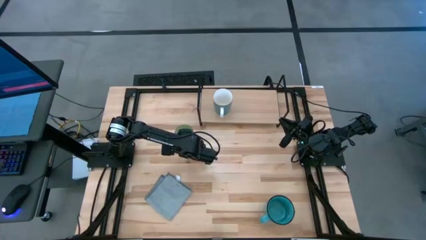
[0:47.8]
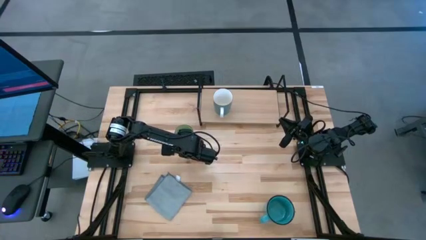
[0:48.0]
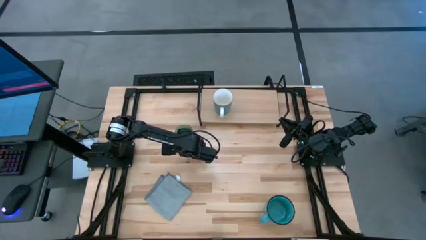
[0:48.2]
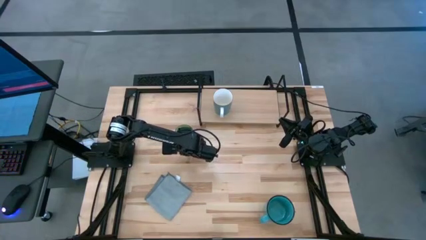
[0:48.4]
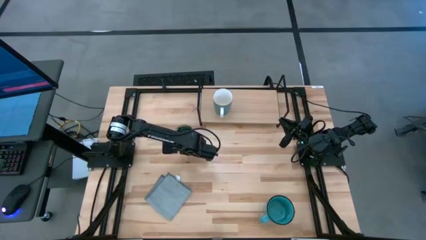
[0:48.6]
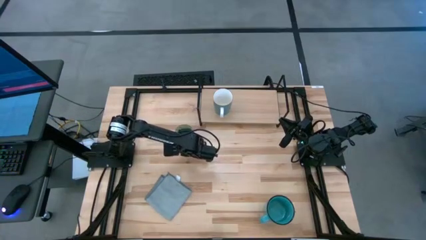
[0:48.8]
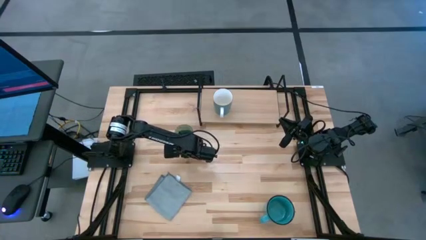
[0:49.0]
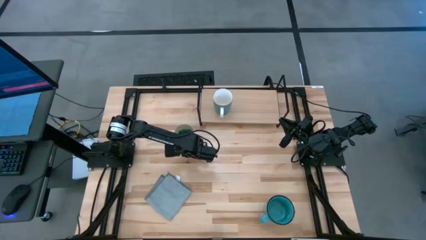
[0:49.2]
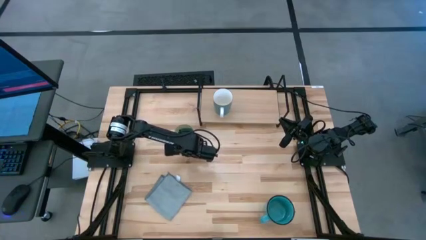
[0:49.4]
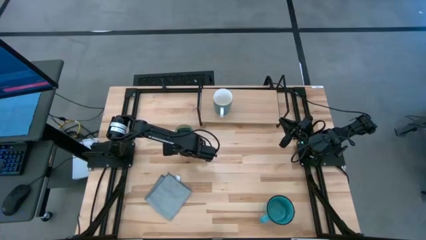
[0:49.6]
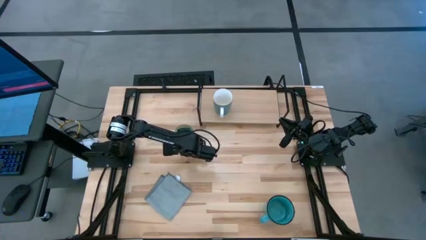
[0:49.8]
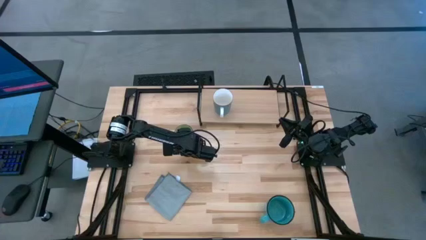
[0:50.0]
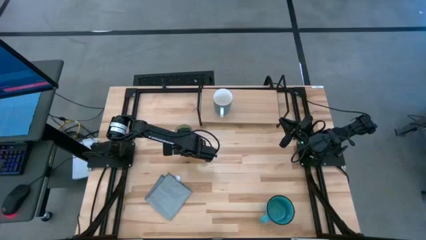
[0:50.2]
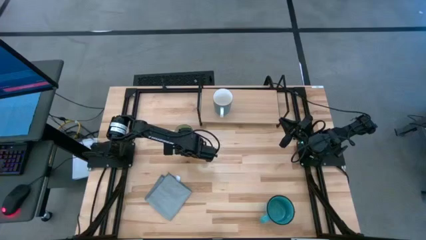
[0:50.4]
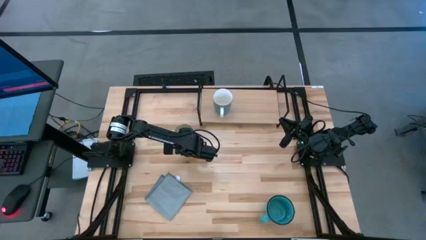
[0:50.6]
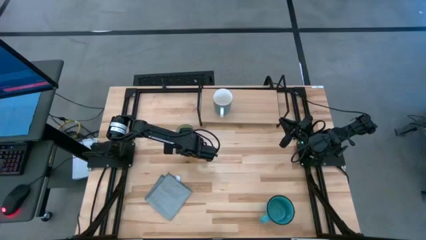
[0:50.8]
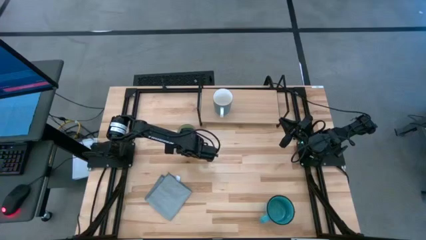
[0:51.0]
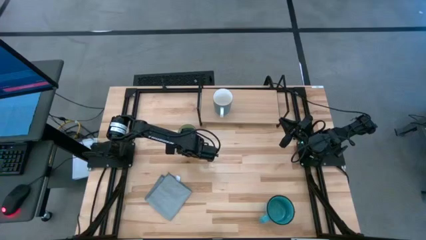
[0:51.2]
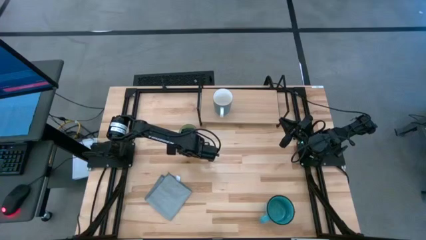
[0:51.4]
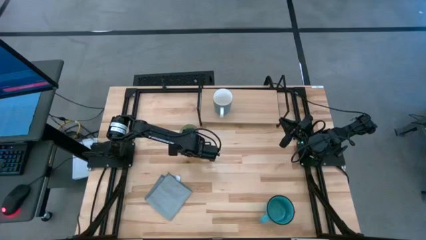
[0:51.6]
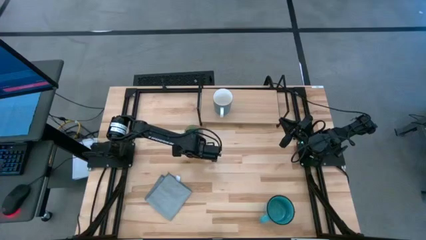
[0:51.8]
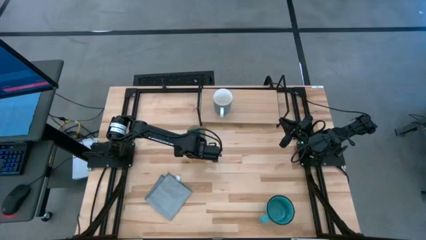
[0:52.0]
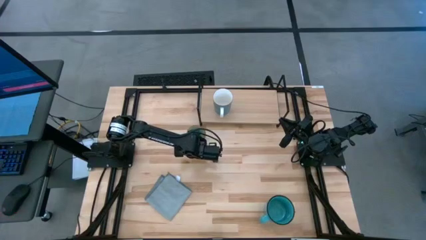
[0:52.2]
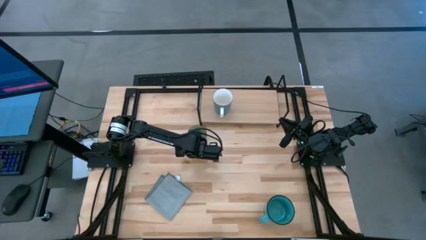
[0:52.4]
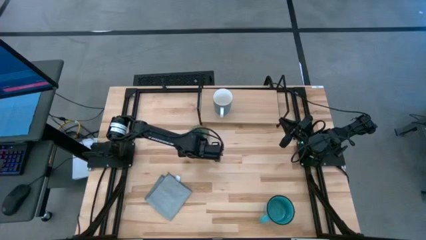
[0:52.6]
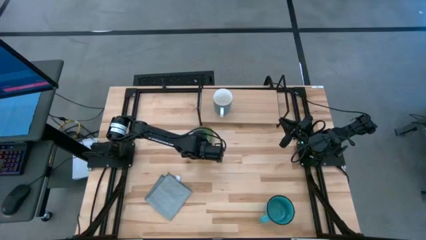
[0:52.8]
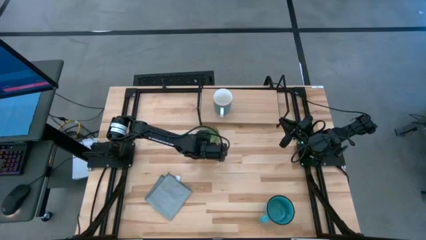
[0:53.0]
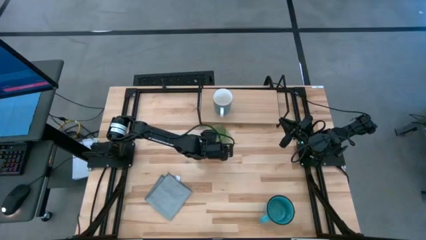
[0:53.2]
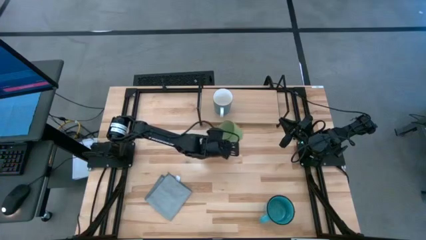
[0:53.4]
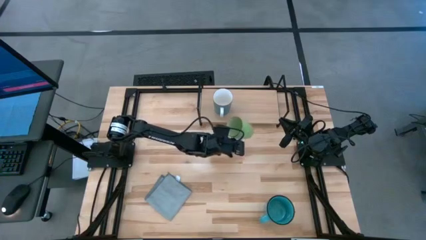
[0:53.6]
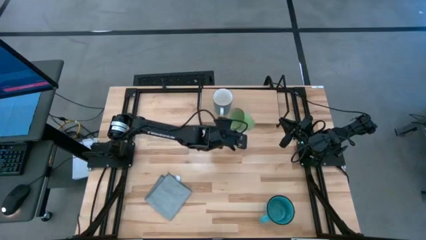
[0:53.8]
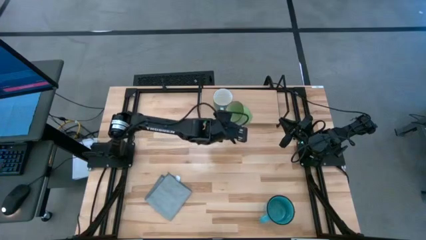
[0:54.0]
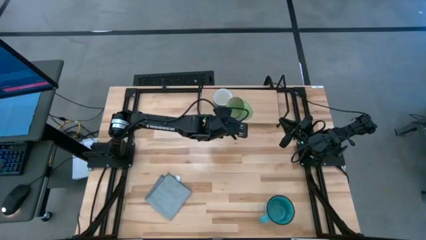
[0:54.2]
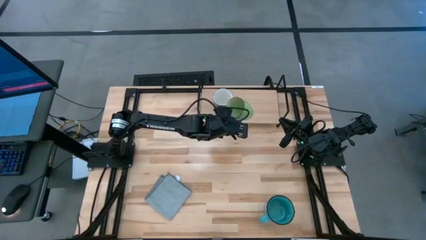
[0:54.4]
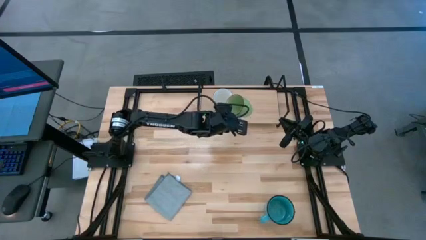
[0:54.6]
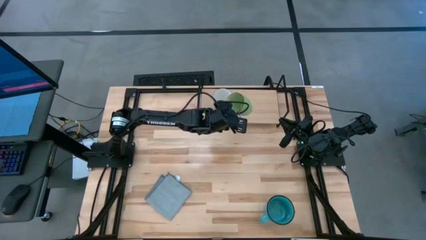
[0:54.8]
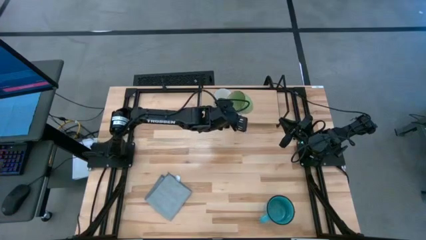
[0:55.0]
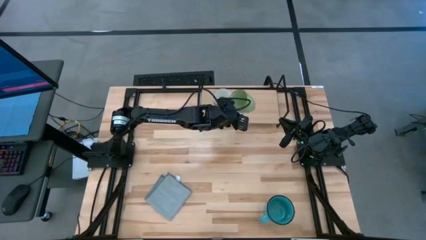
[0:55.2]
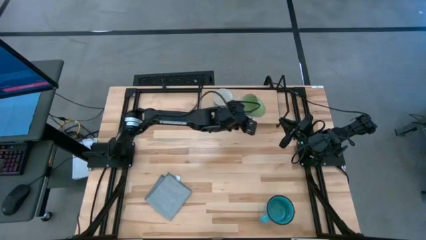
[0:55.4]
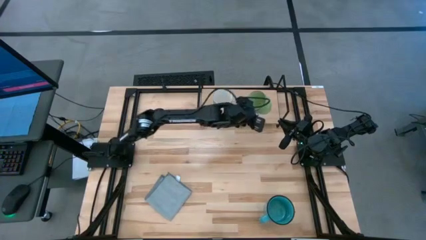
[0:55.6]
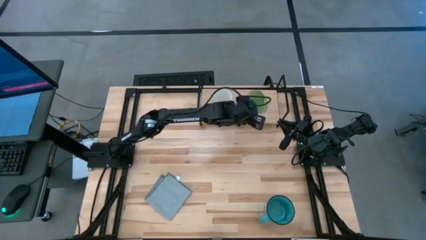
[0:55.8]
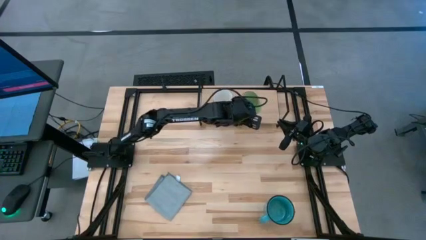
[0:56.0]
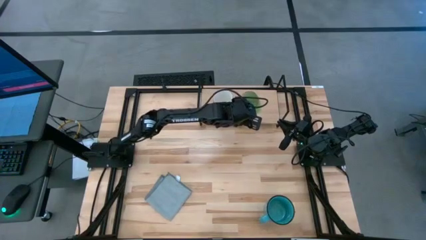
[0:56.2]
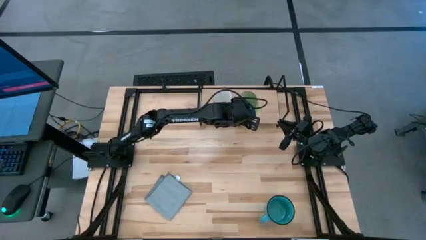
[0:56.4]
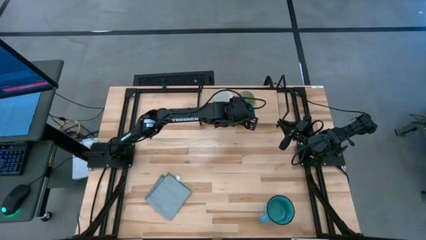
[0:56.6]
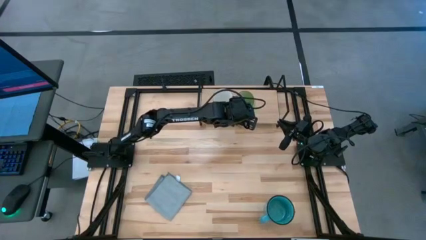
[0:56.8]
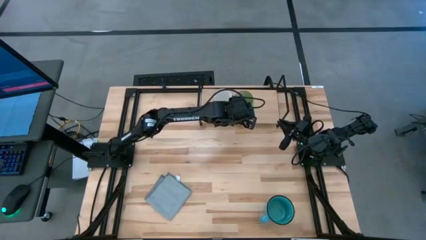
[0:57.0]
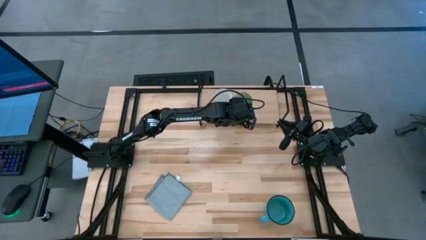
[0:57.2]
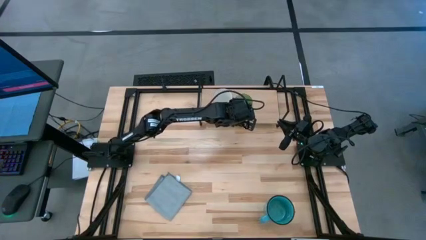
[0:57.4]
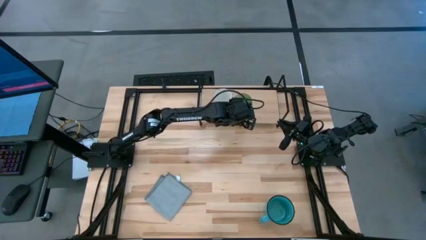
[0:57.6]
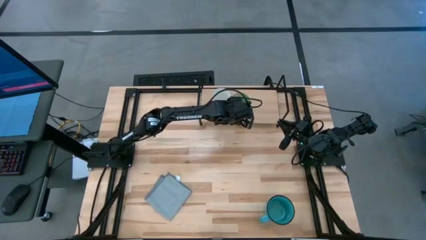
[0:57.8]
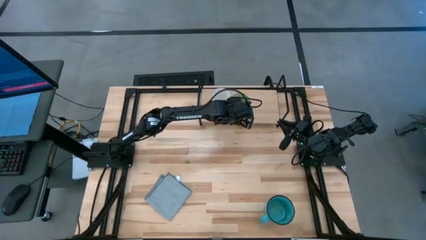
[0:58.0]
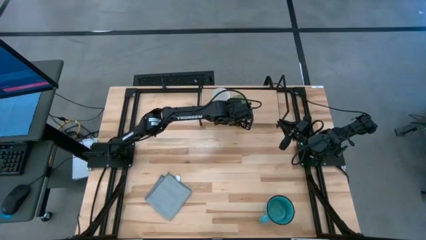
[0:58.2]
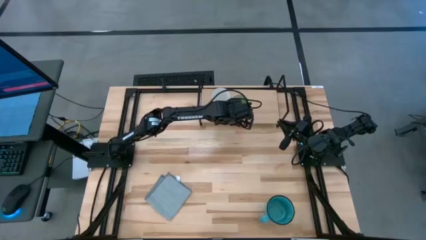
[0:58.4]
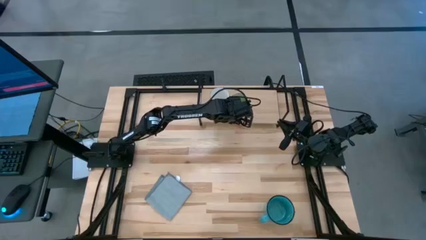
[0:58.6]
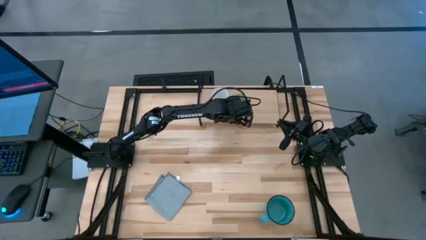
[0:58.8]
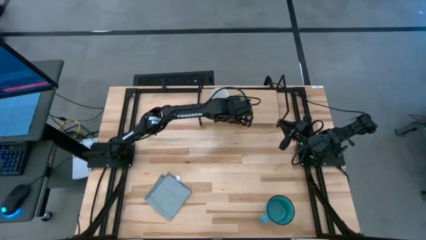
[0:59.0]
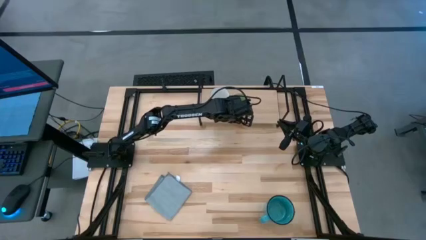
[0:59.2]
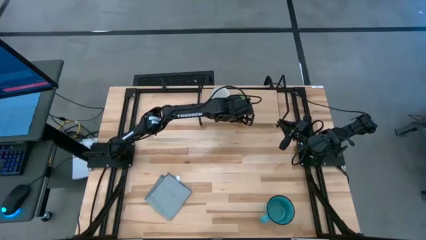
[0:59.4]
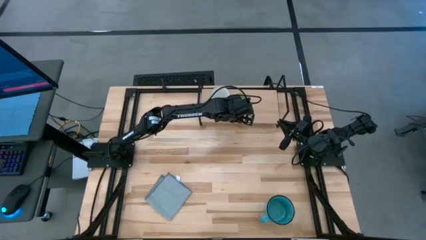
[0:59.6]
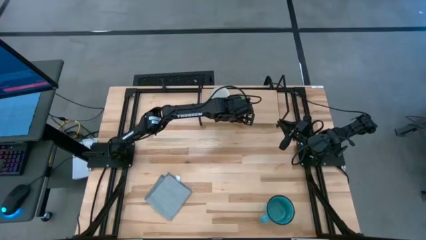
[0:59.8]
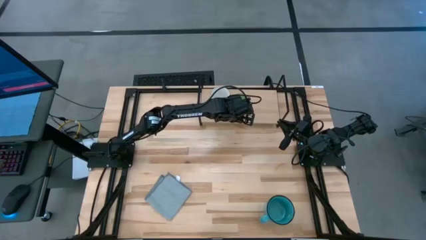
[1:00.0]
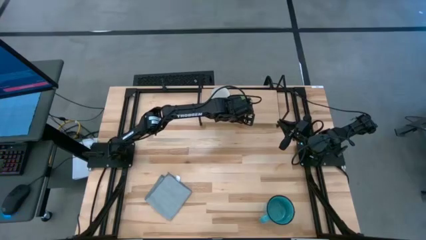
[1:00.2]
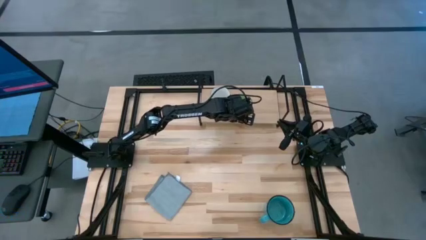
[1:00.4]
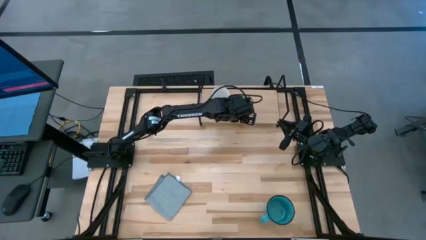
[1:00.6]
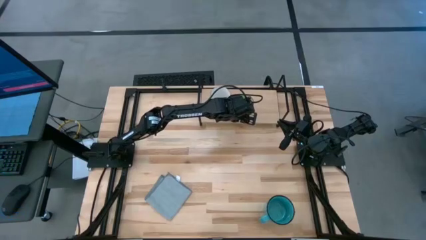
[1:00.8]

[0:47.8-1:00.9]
Task: Stack small to large cups/mugs on shelf
Put the green mug on the shelf
